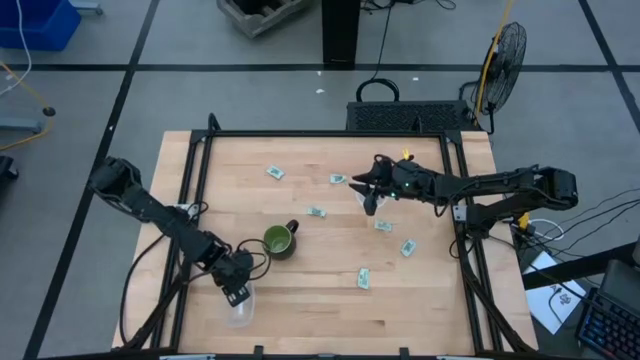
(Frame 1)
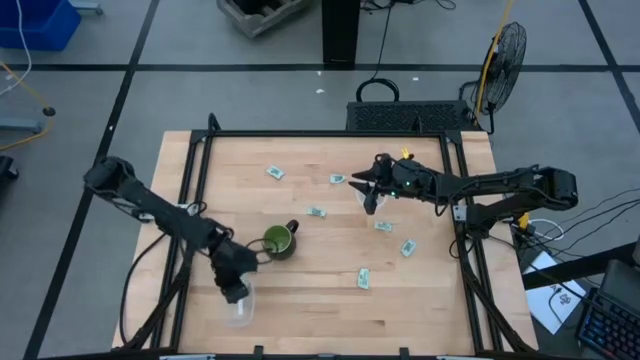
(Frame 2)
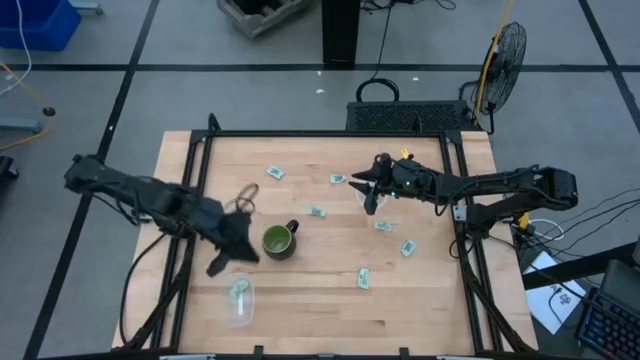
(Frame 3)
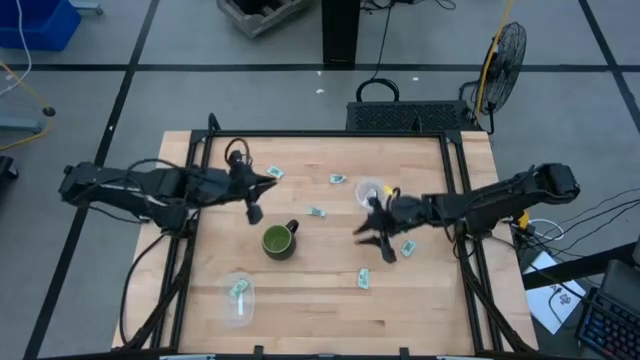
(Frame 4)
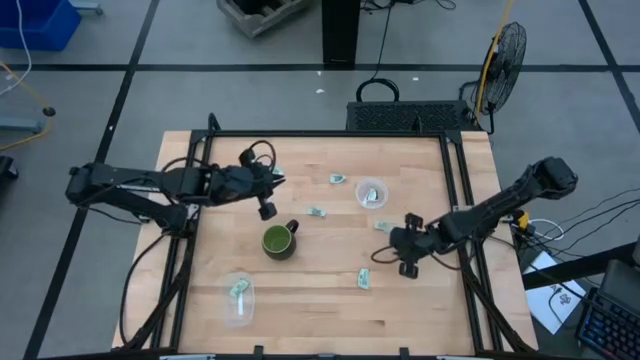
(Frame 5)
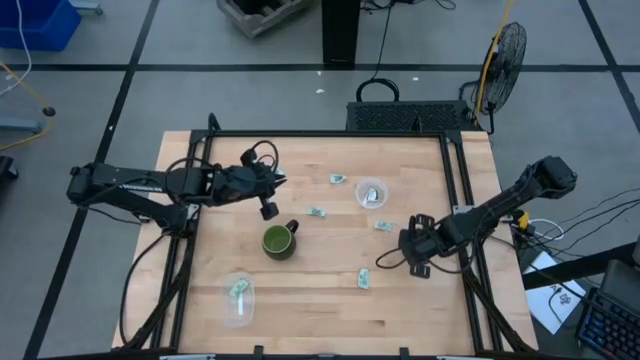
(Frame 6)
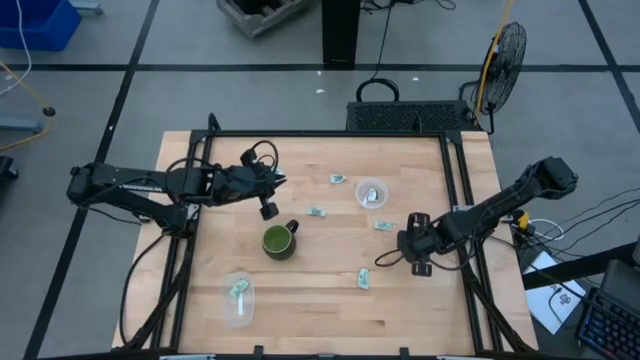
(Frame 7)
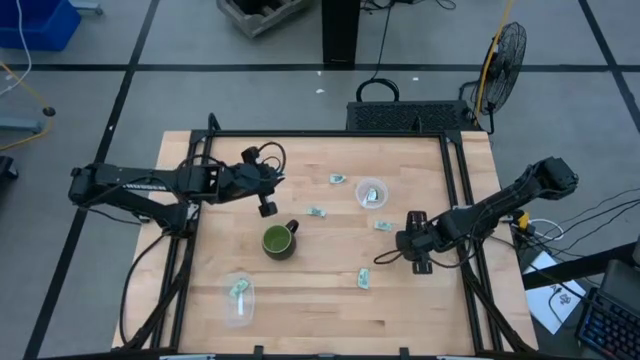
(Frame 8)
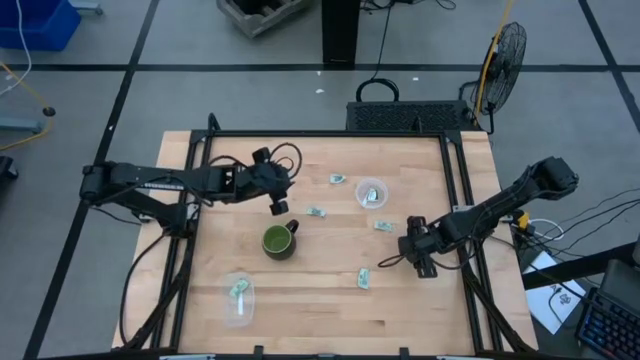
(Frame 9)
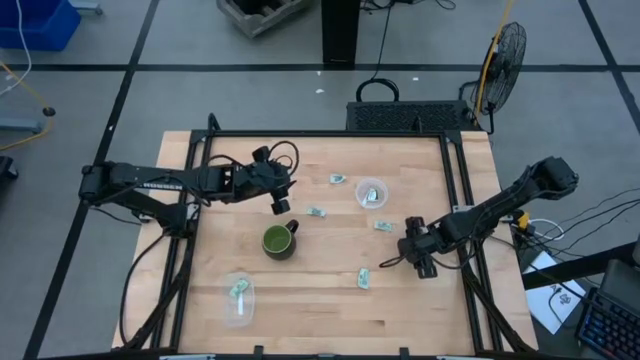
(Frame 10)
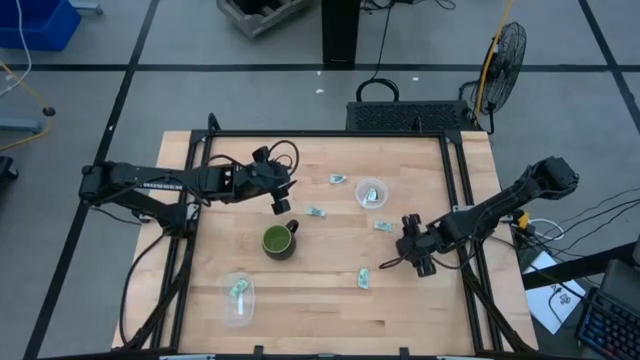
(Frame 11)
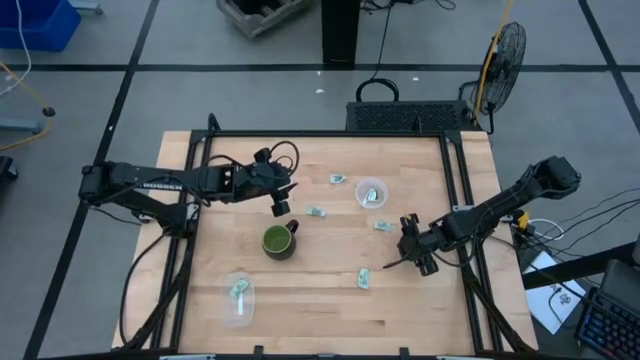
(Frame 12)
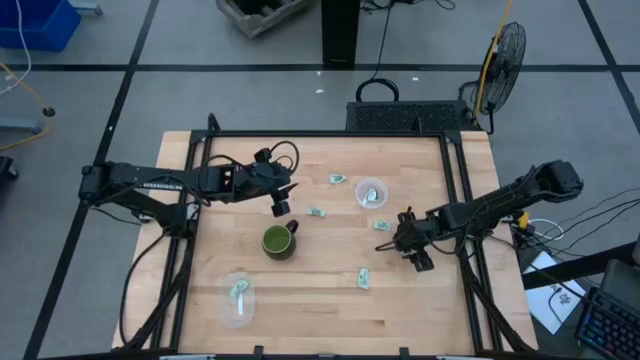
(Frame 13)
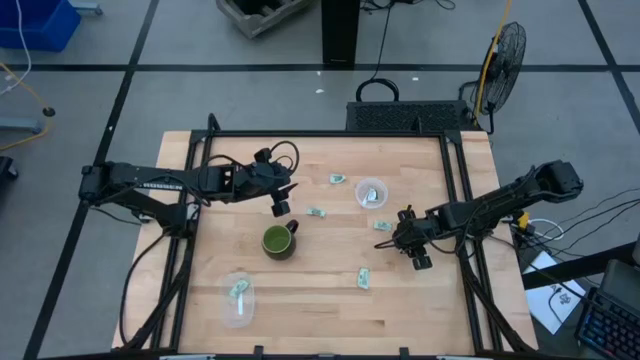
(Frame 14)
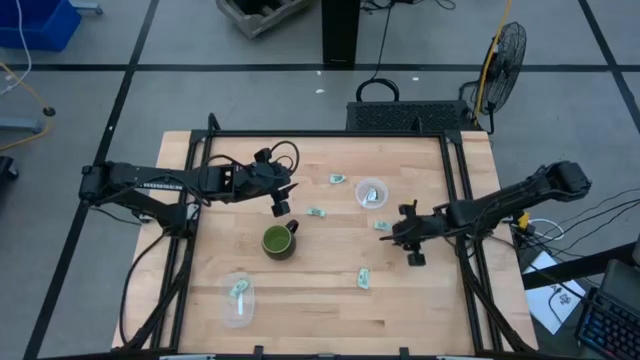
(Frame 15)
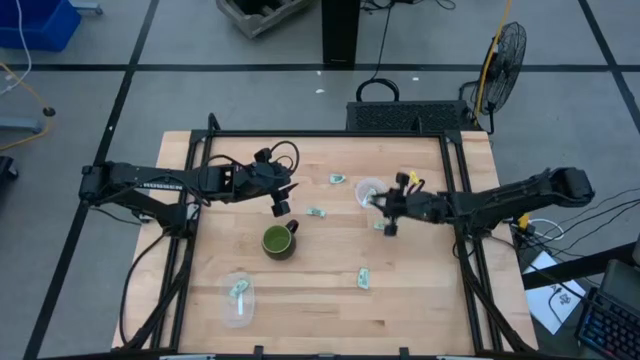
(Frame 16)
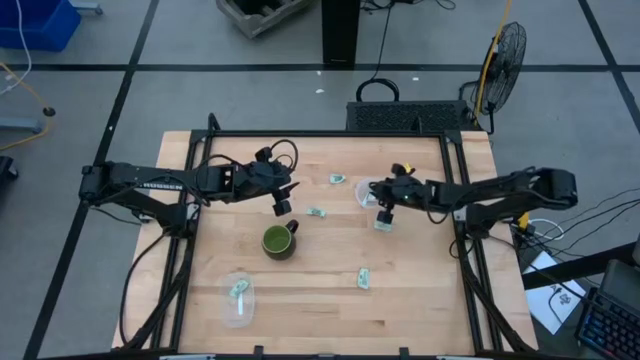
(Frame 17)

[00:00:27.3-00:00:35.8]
Task: Pick and place Stevia / Truvia into bins
Put the white stevia packet into the circle transparent container

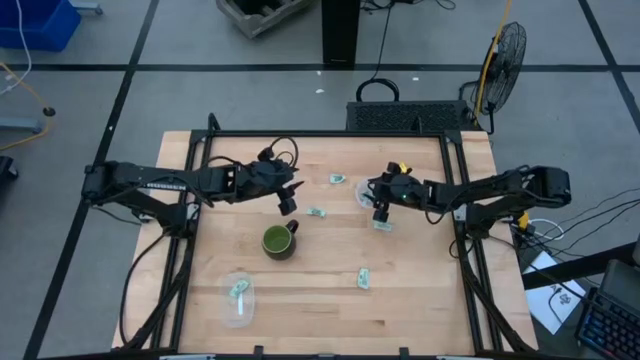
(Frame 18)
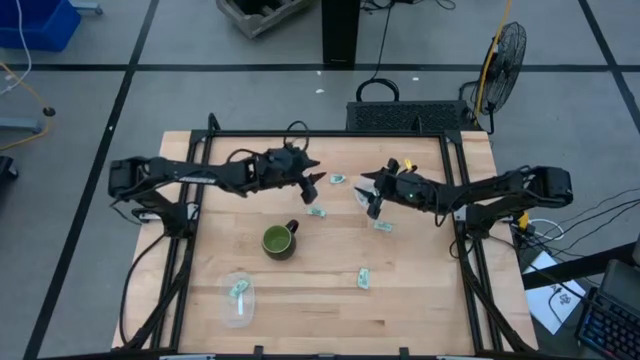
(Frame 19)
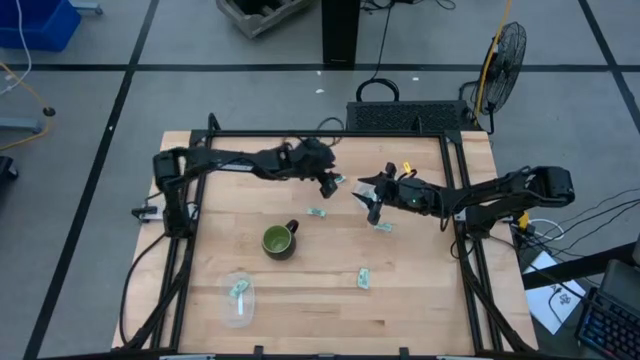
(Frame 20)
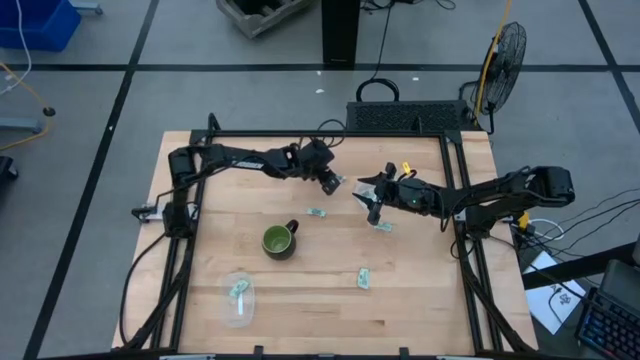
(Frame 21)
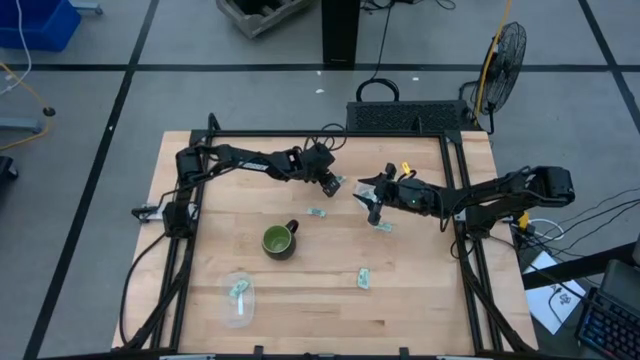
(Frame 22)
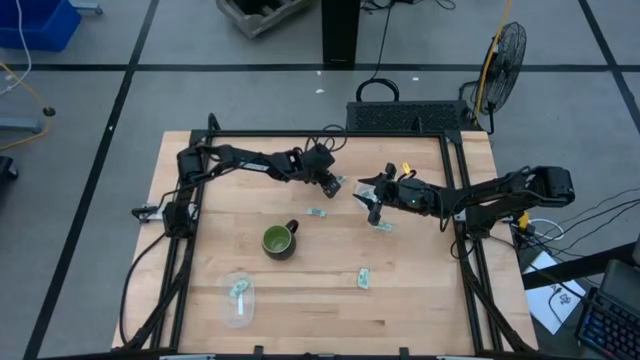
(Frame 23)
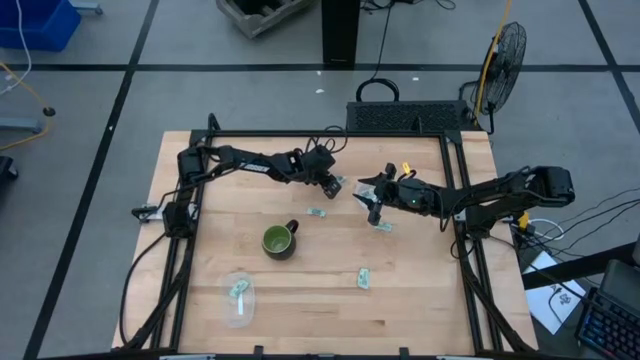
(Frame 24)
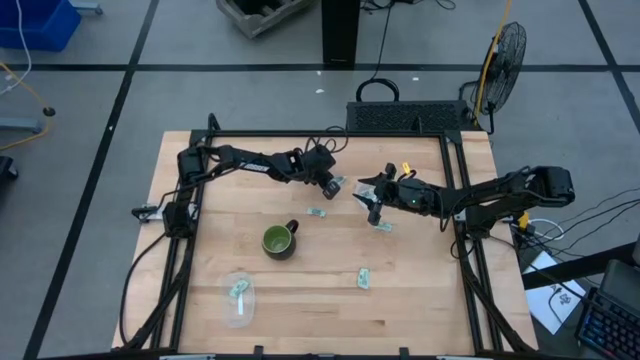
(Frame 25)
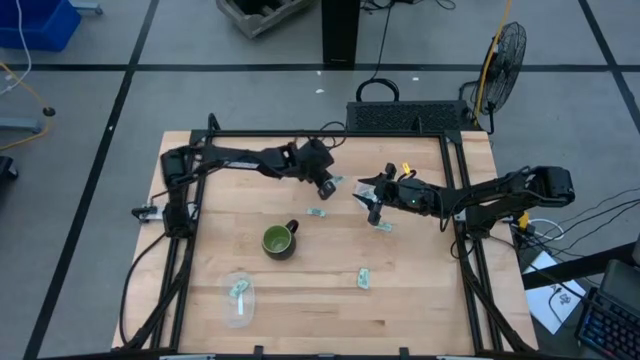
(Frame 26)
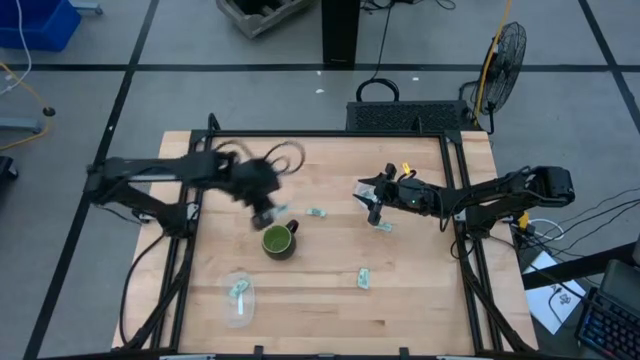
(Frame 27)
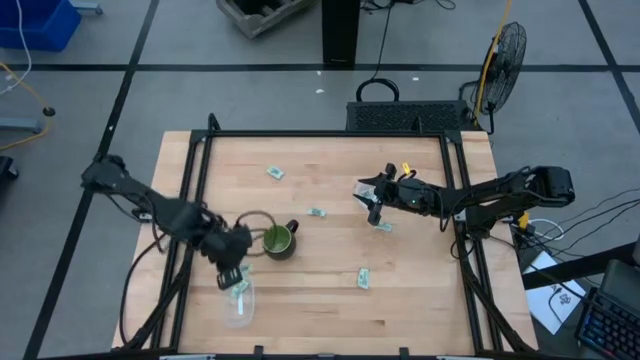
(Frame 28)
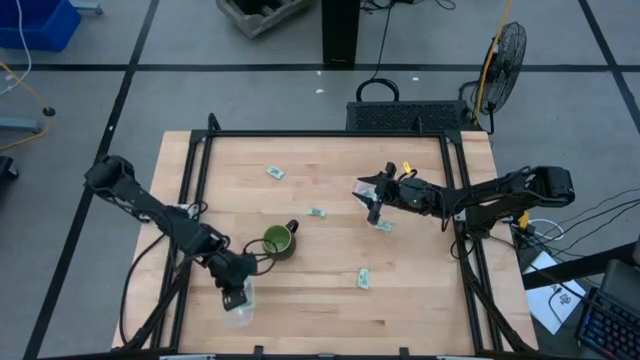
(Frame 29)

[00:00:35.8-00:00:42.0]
Put the white stevia packet into the rectangle transparent container

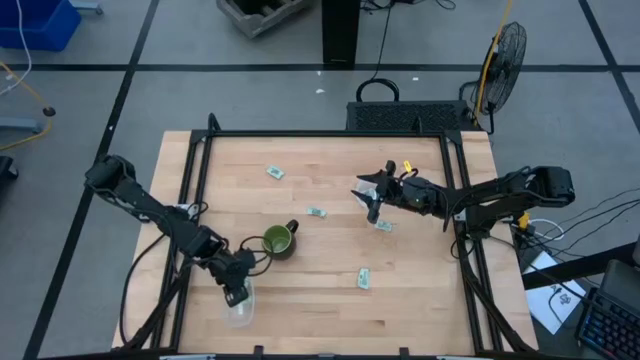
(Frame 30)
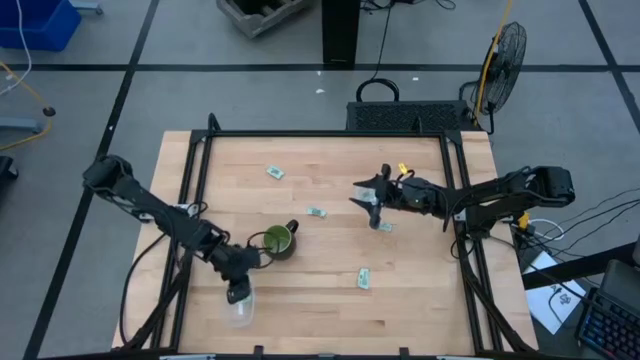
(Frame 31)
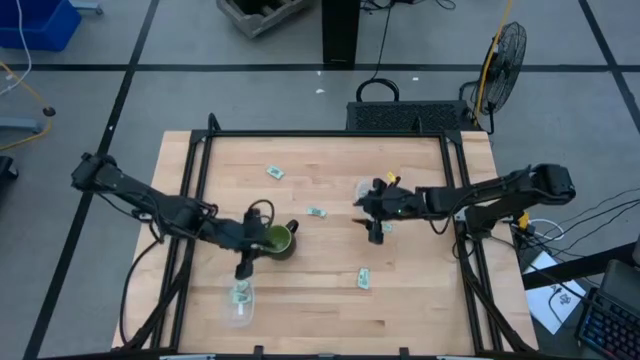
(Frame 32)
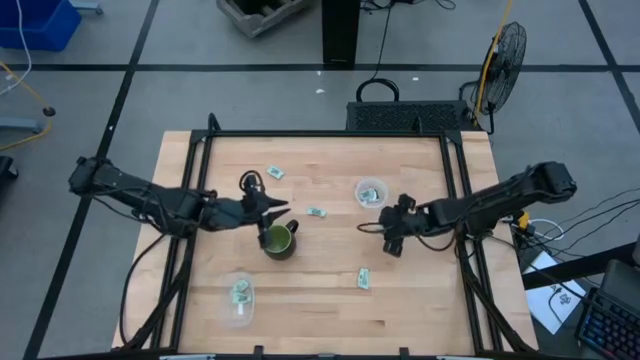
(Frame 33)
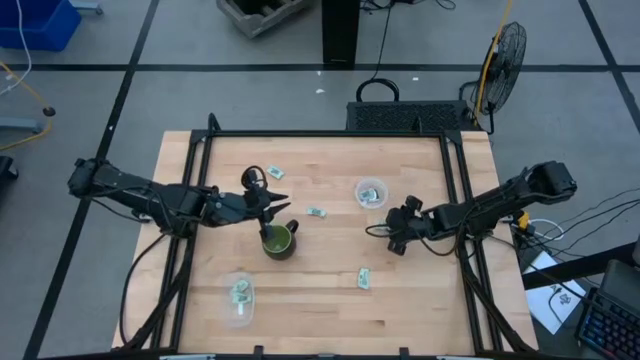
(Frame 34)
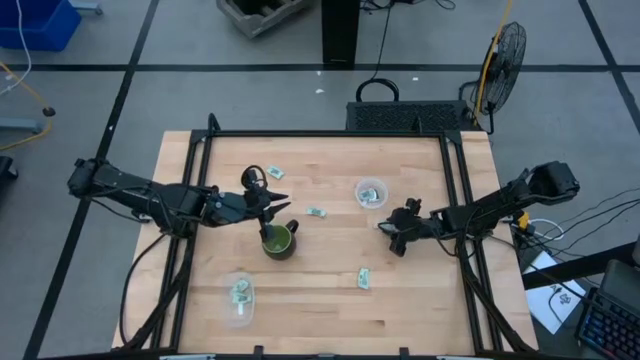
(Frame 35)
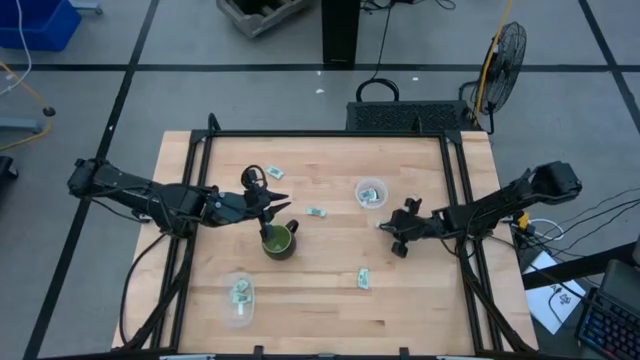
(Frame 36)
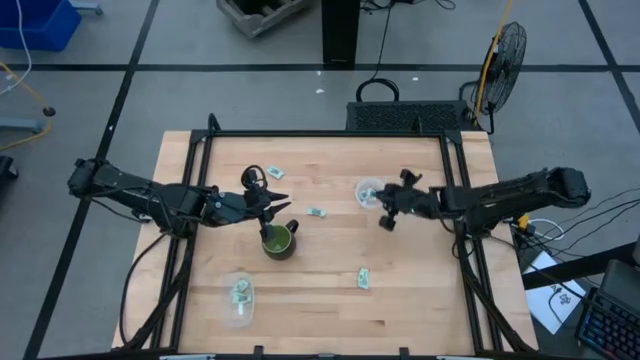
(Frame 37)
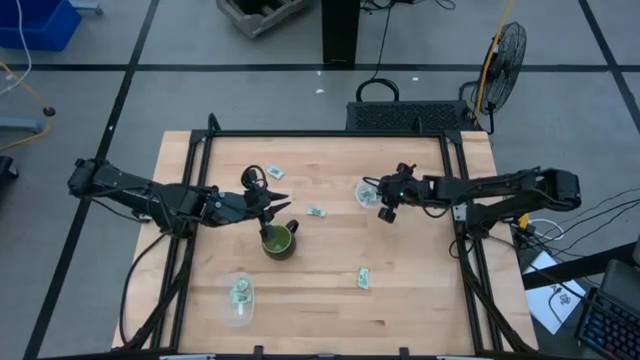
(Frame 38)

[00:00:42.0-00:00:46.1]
Put the white stevia packet into the circle transparent container
